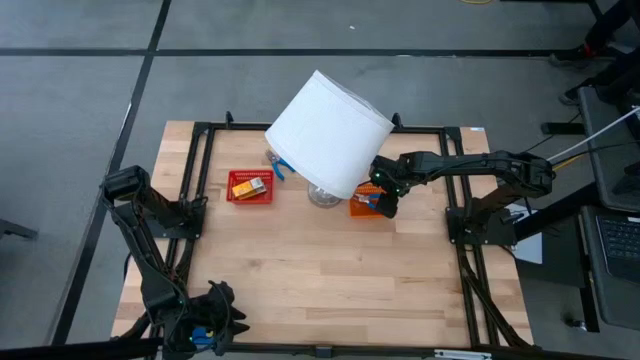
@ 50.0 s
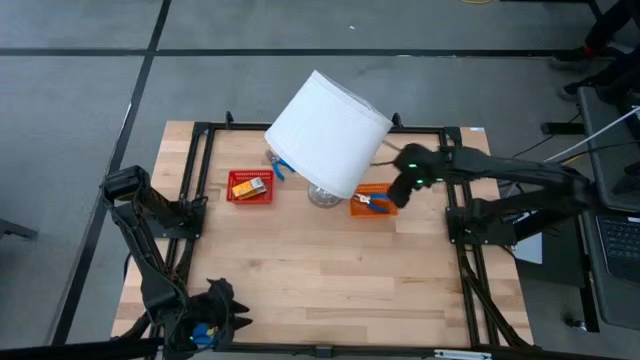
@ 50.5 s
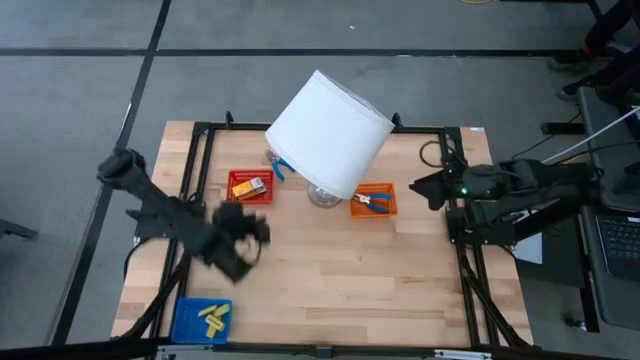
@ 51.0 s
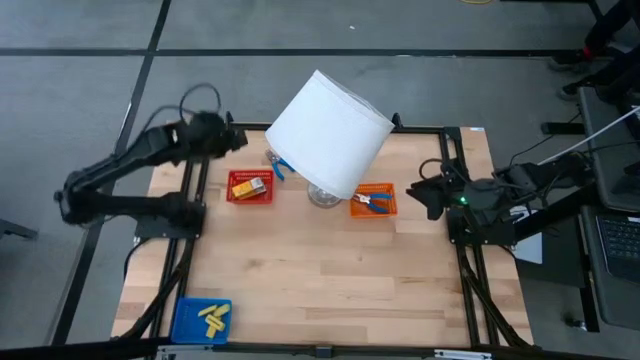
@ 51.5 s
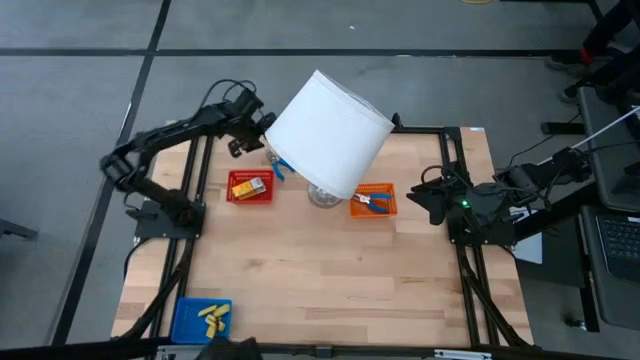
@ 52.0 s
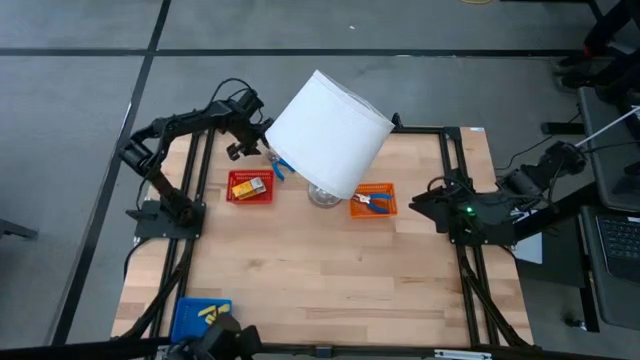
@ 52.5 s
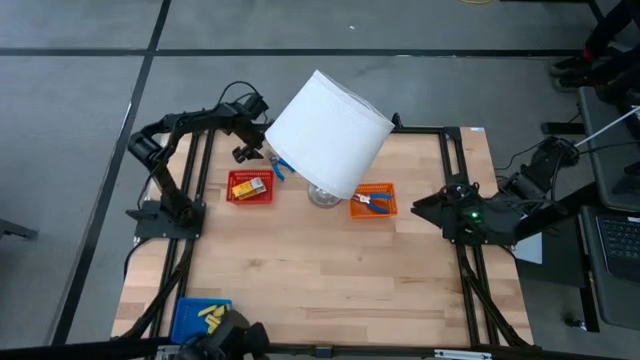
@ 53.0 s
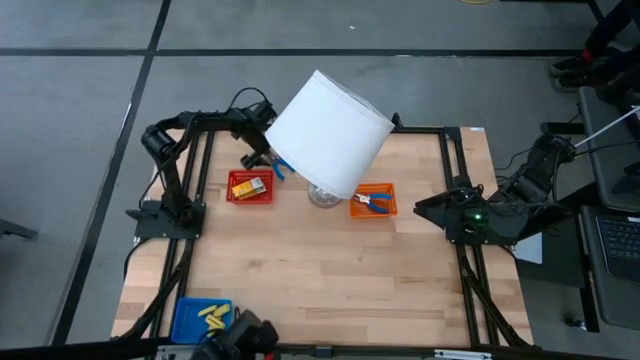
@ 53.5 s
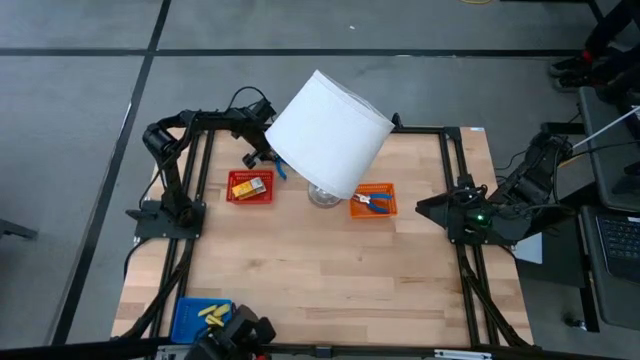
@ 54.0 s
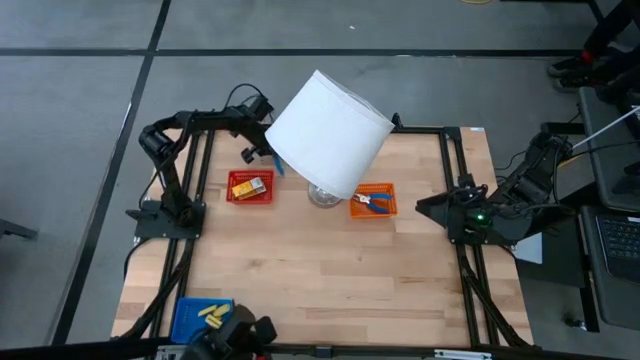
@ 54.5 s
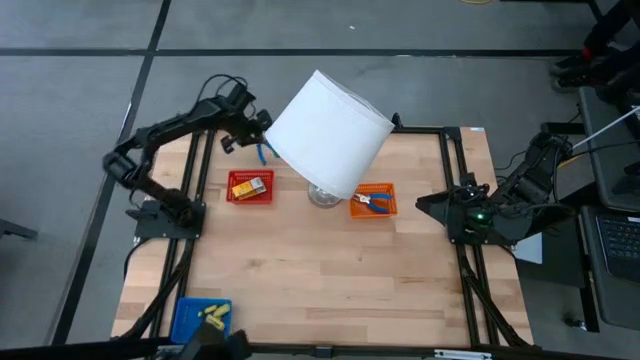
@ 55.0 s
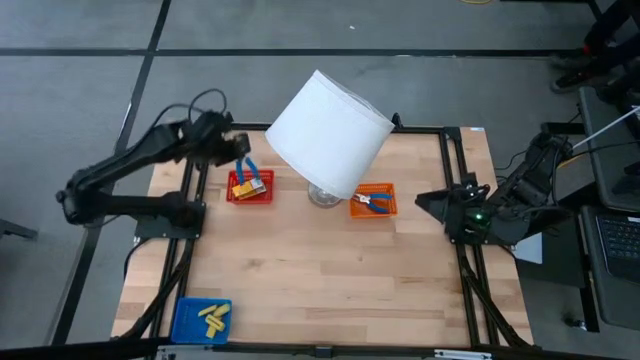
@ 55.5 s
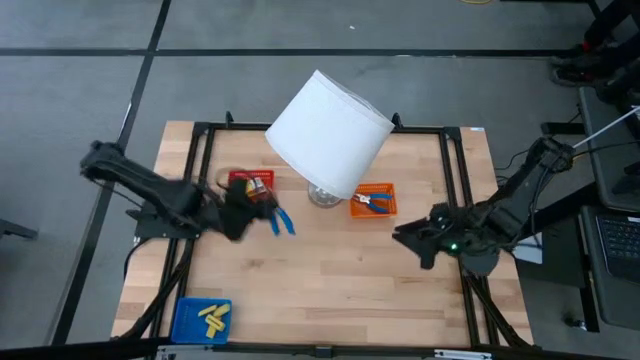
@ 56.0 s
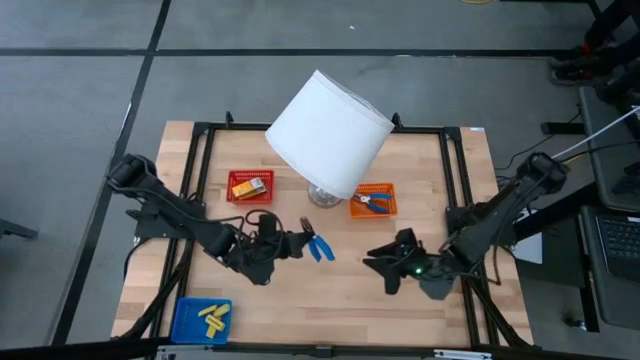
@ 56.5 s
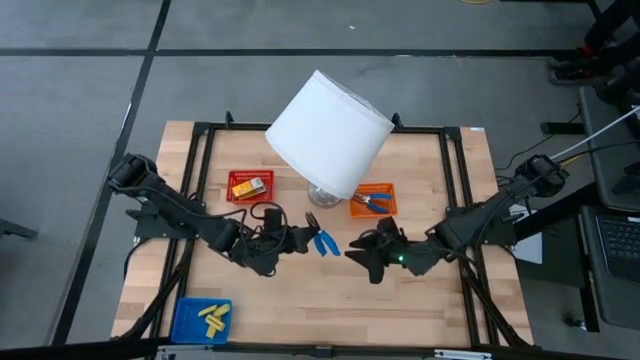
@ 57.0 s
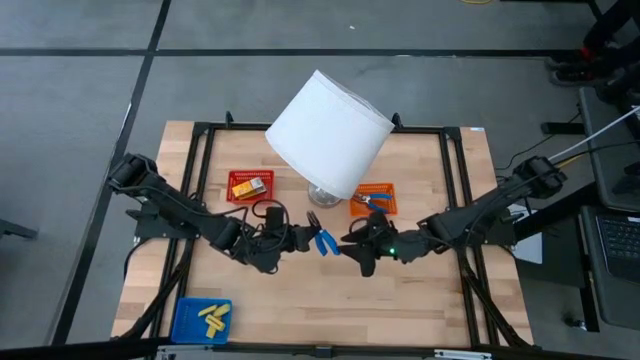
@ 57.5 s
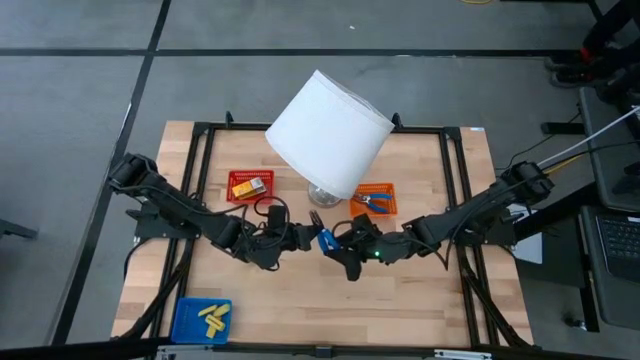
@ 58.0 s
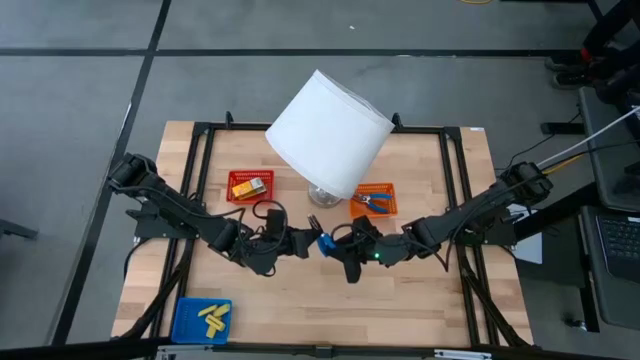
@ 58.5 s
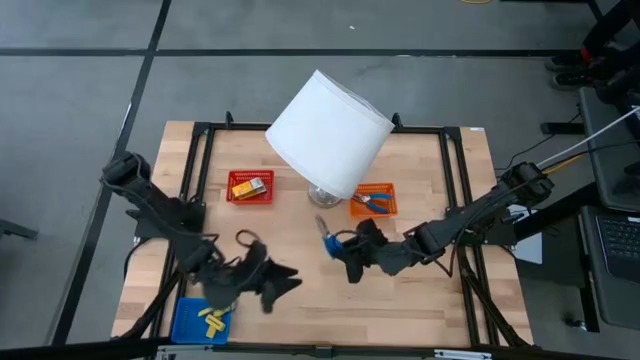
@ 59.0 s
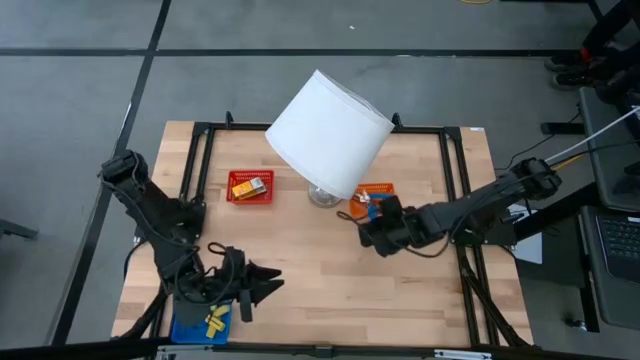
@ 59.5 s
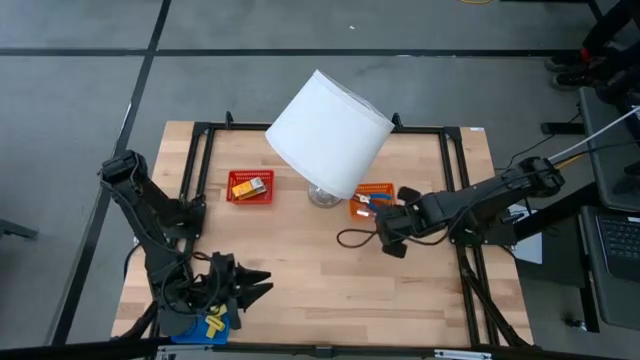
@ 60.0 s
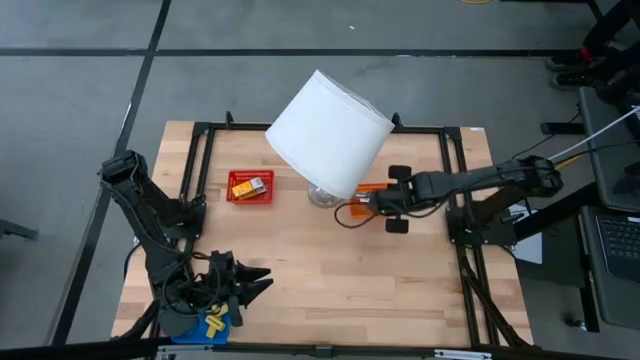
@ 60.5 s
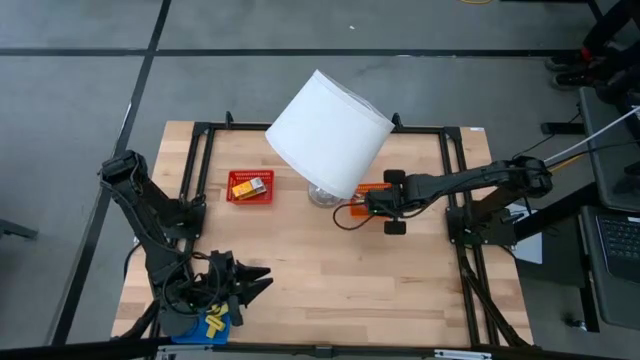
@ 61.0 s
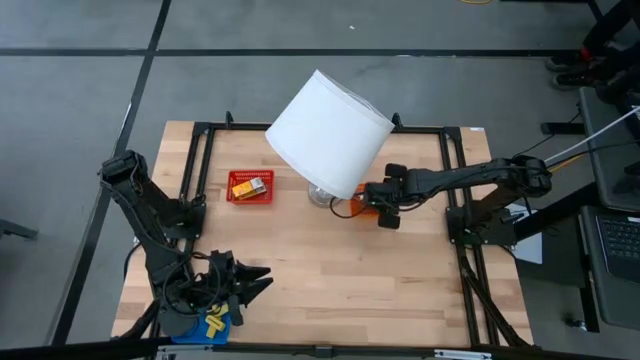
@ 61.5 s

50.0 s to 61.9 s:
Task: Pick & Place School Supplies
Put the blue hole puncher into the orange bin

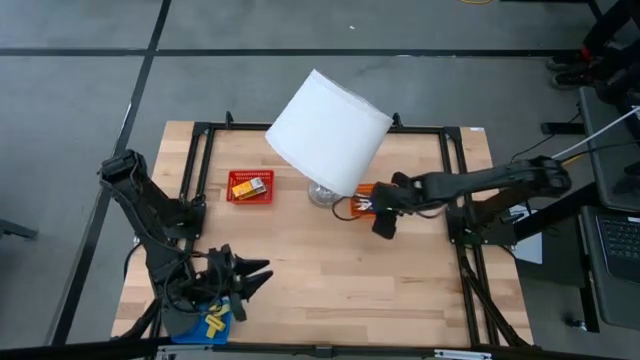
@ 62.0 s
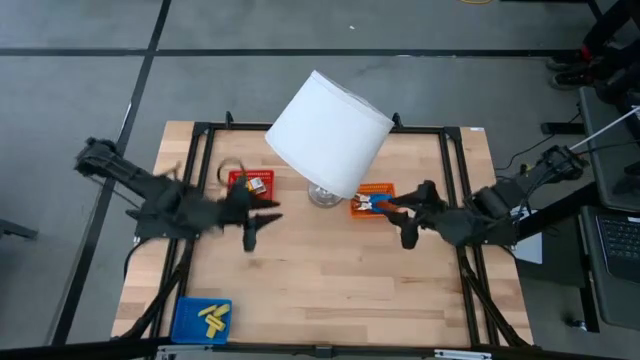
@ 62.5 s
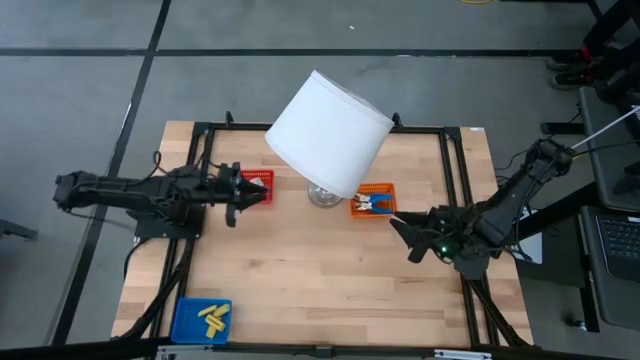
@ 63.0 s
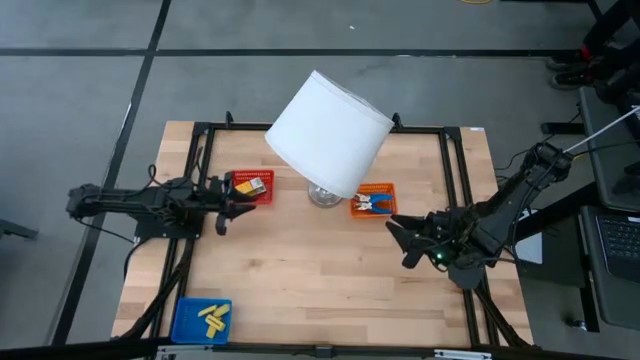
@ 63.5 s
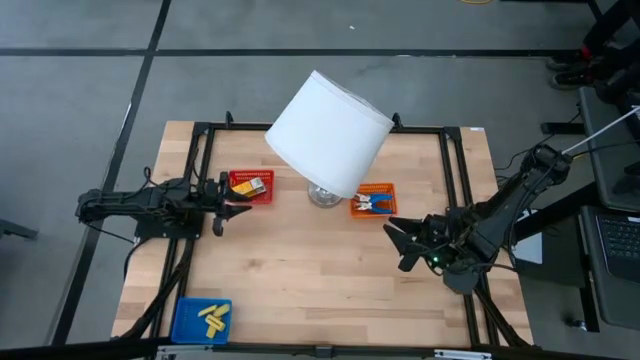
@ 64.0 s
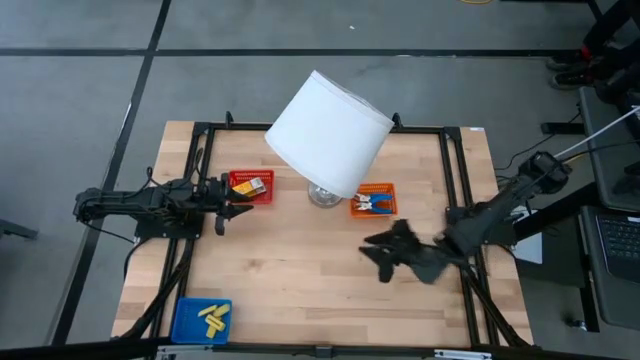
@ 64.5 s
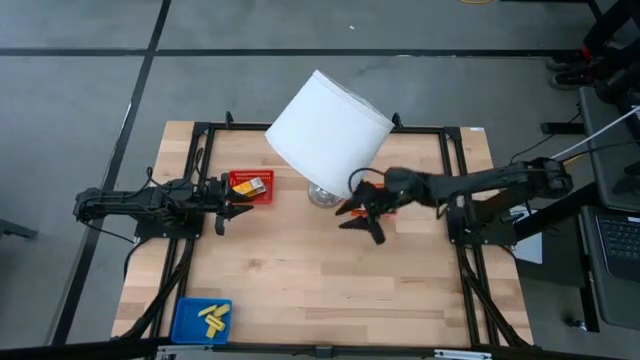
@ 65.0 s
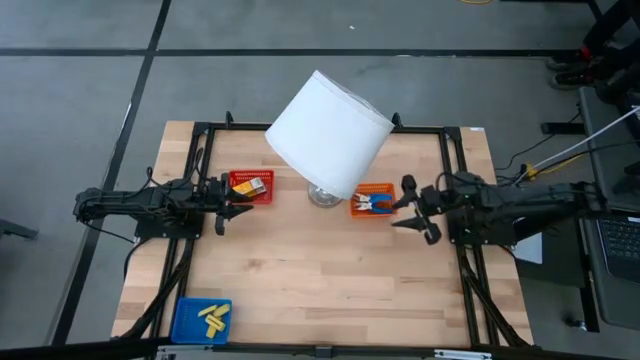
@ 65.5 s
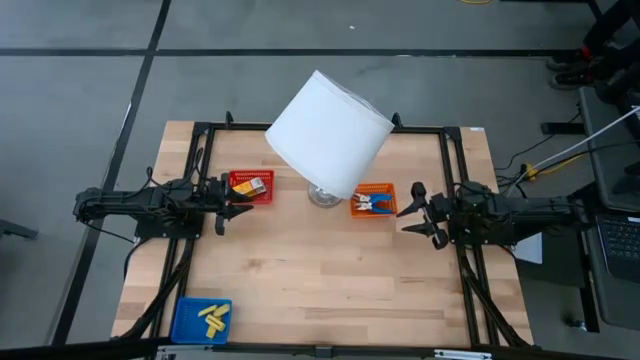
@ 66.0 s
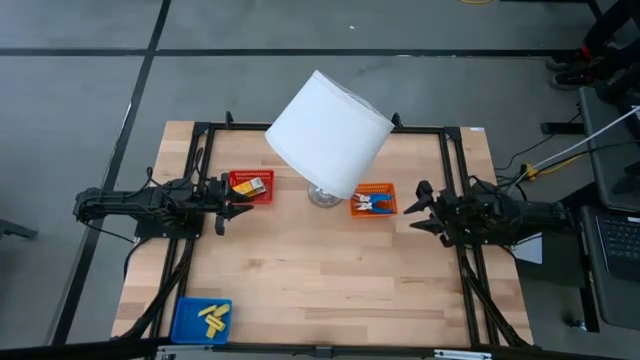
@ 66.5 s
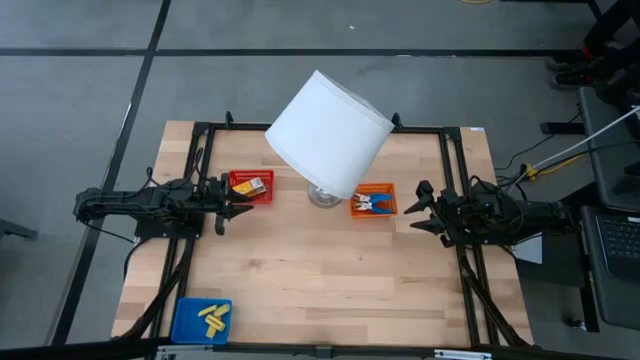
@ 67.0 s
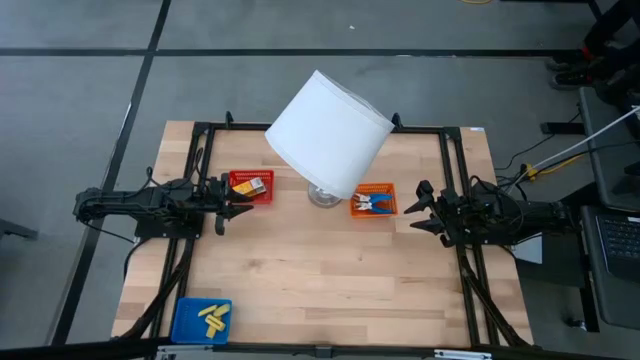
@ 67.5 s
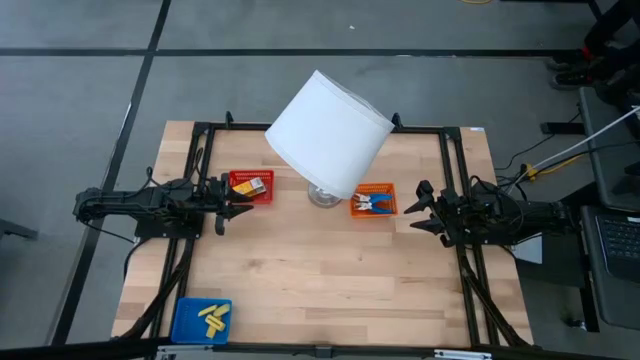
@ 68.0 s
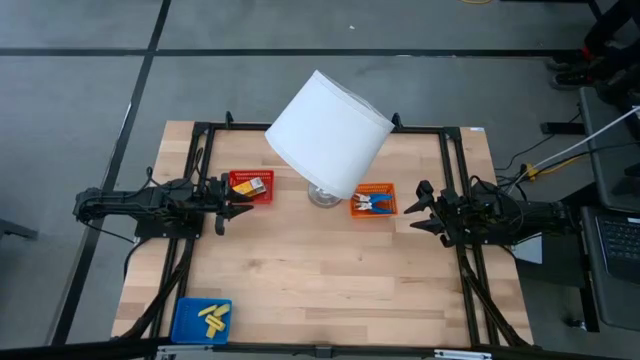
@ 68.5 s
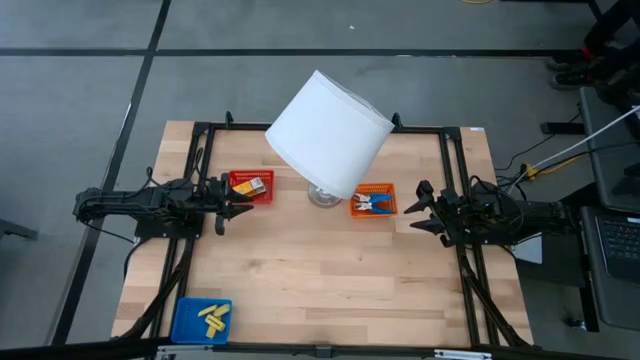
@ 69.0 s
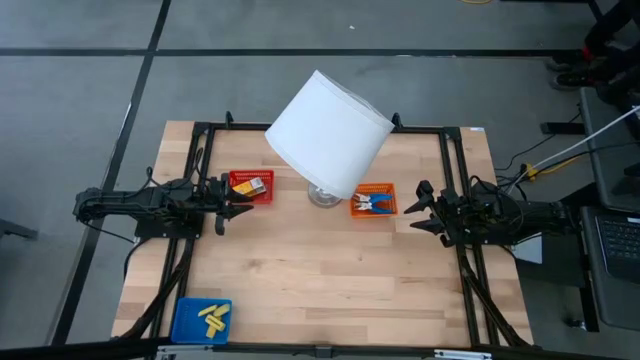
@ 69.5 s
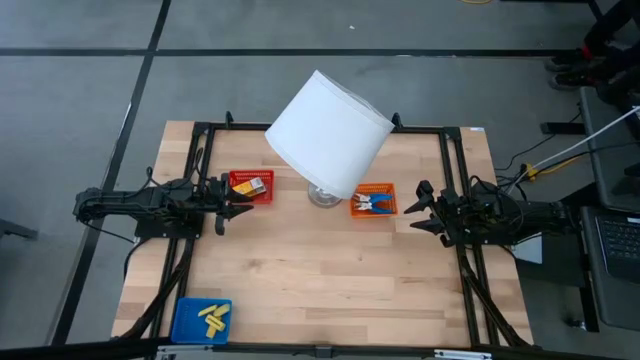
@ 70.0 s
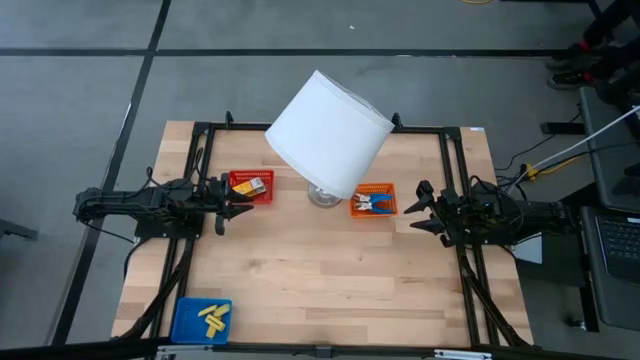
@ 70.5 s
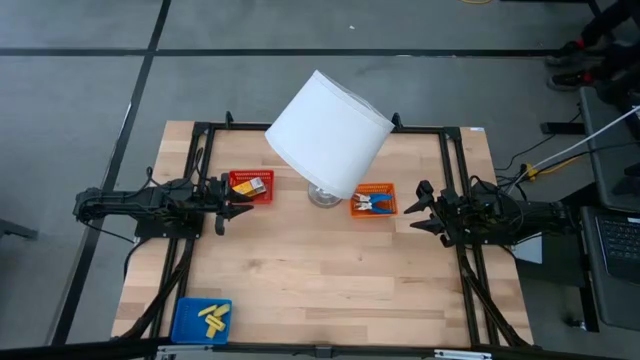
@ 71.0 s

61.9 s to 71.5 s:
Return to Home Position

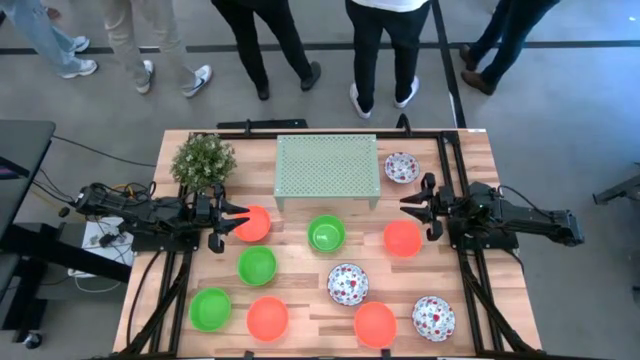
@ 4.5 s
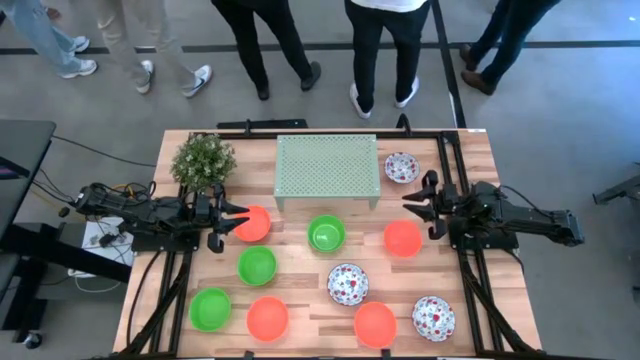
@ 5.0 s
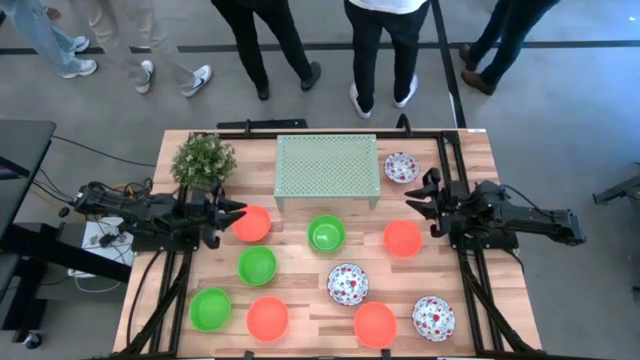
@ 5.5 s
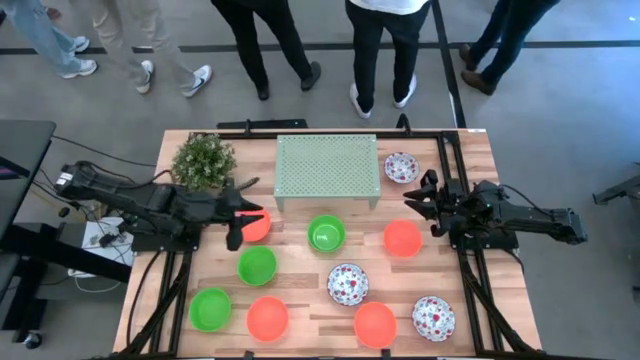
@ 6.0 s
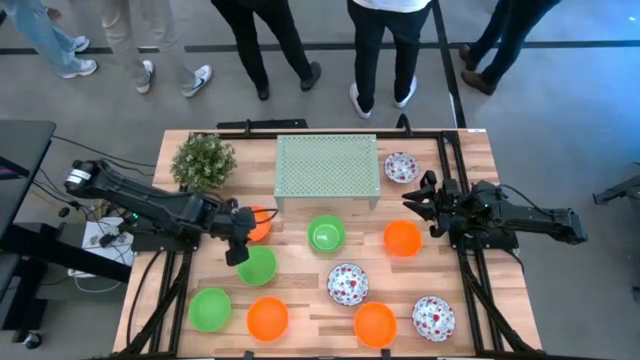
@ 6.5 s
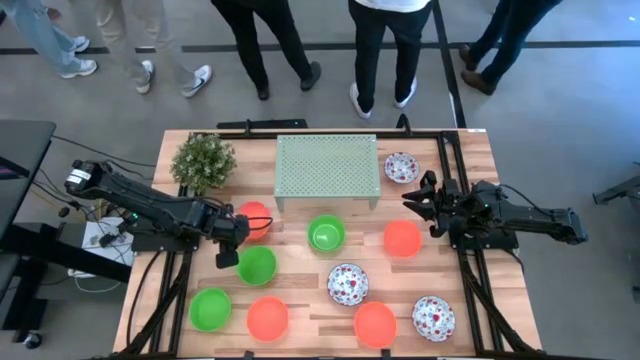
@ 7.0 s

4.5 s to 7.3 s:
Task: Pick & Place Mini bowls
Put the orange bowl on the shelf
